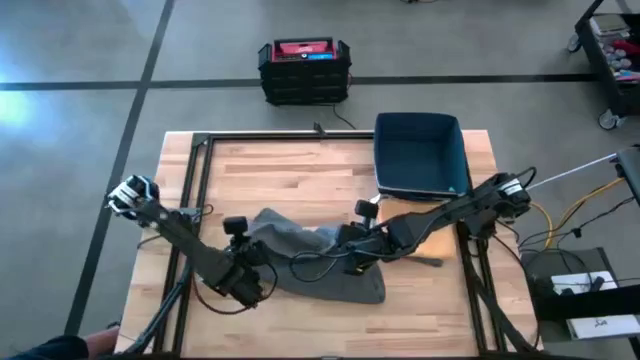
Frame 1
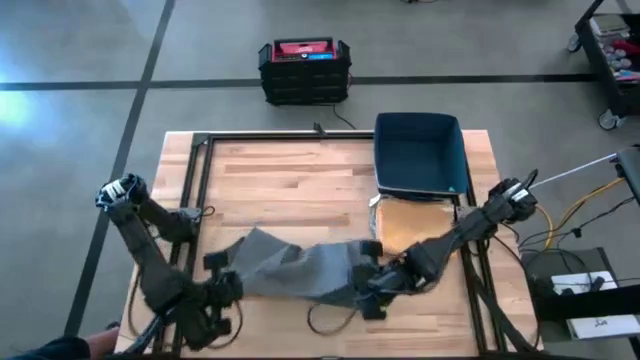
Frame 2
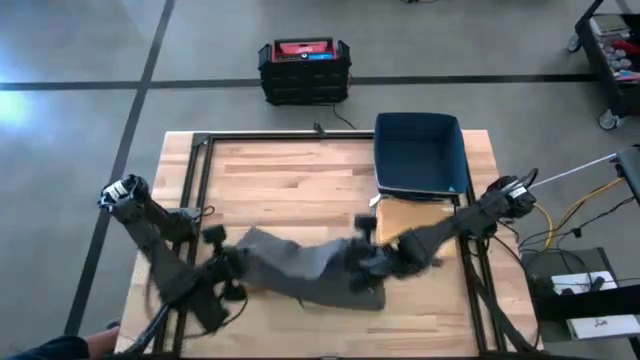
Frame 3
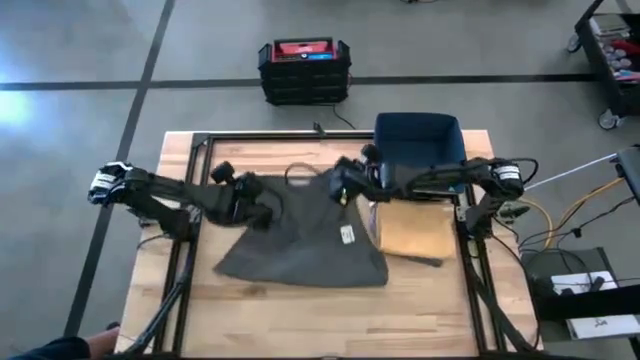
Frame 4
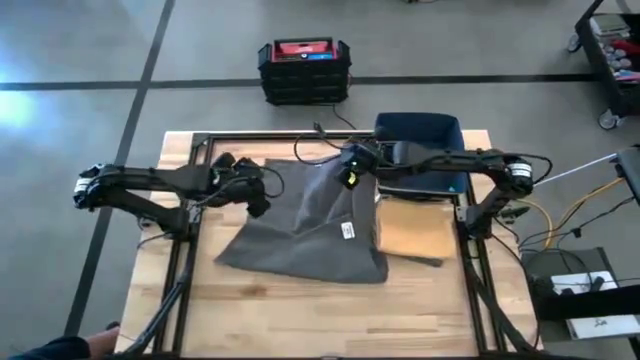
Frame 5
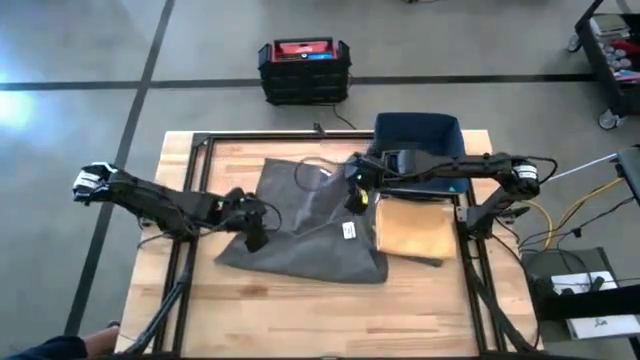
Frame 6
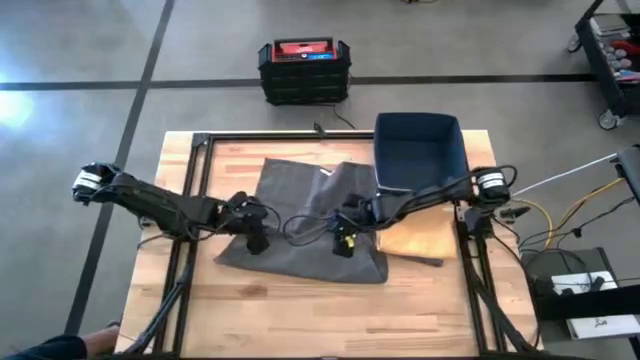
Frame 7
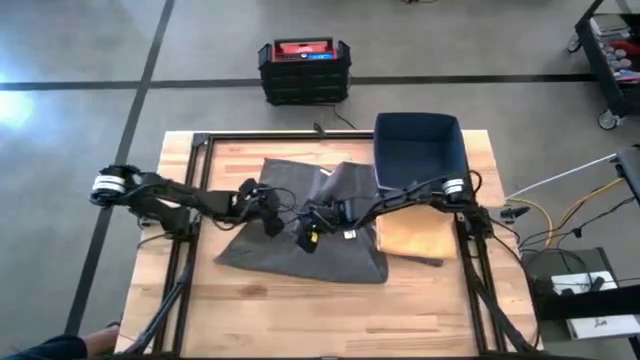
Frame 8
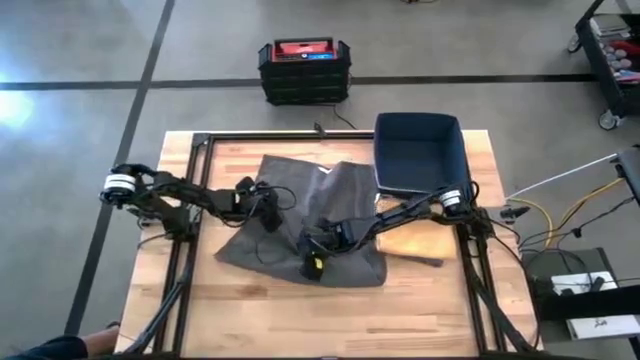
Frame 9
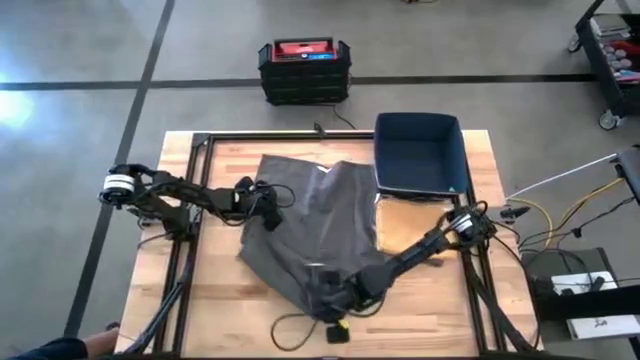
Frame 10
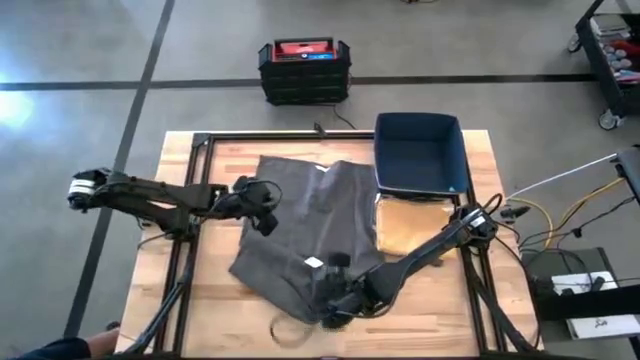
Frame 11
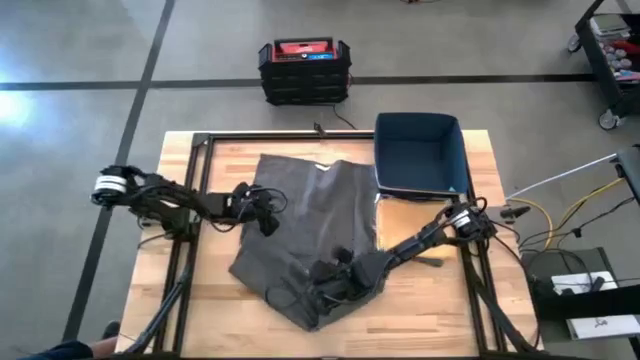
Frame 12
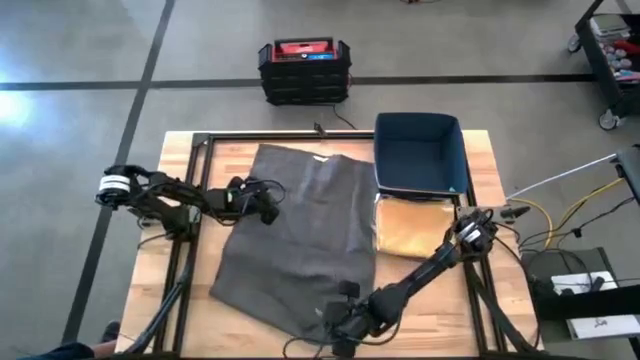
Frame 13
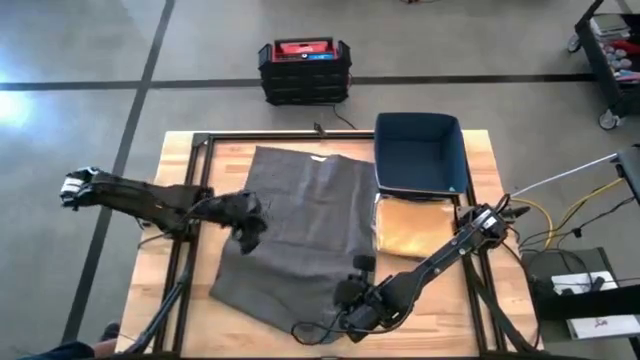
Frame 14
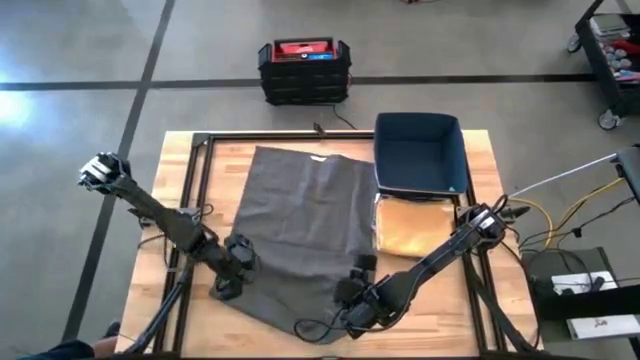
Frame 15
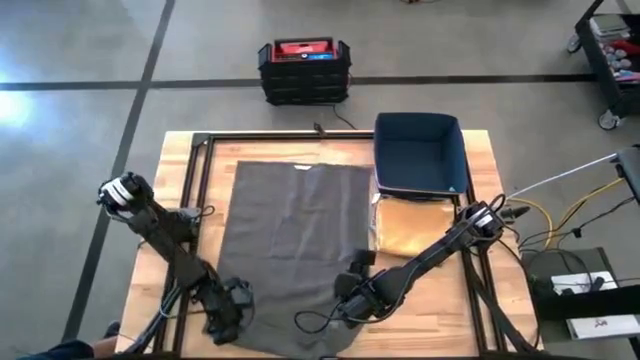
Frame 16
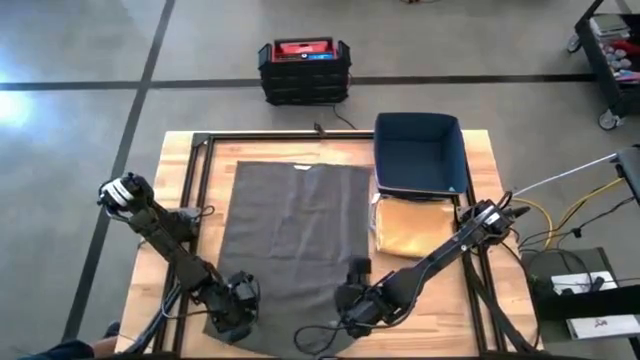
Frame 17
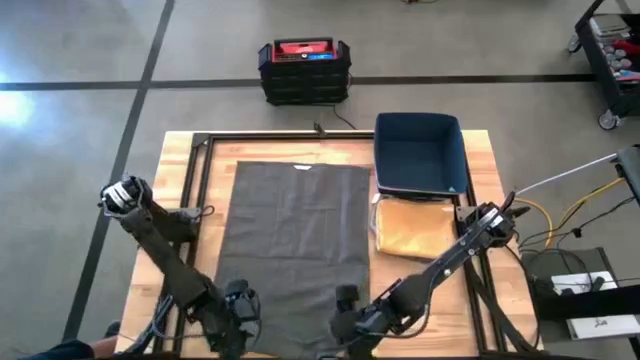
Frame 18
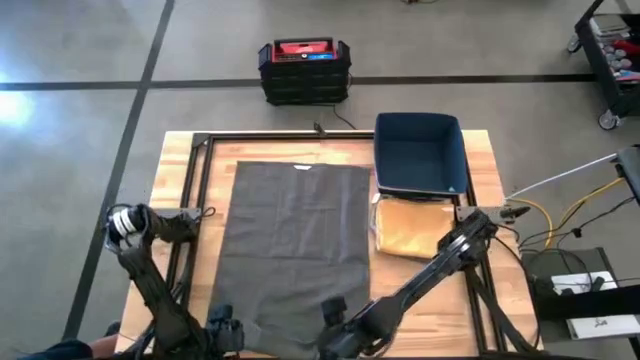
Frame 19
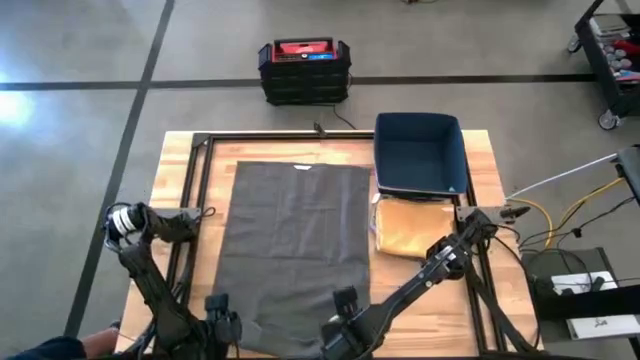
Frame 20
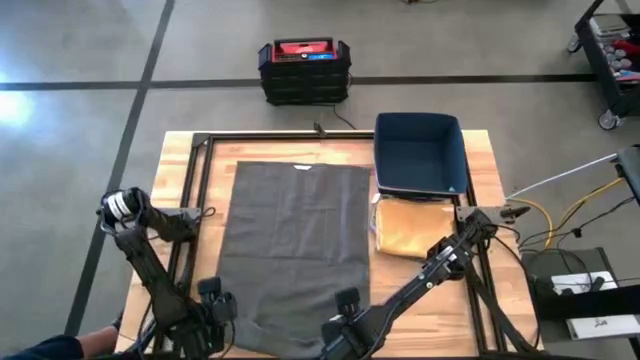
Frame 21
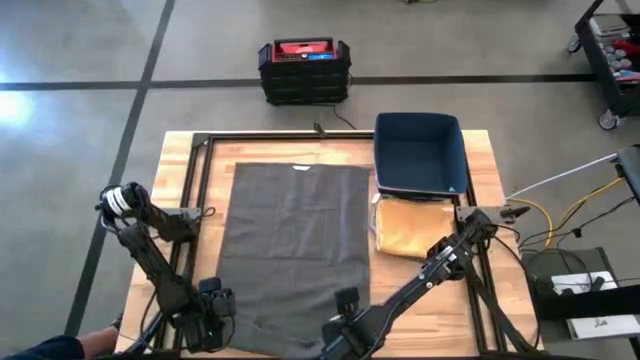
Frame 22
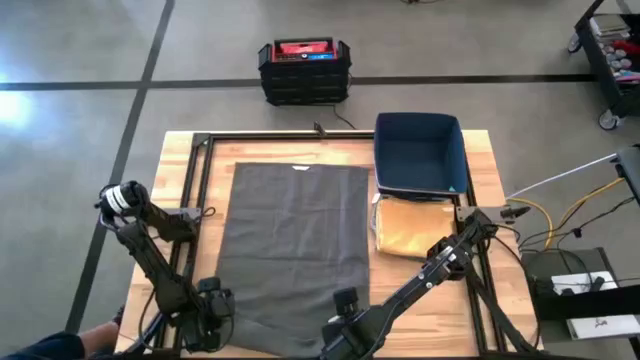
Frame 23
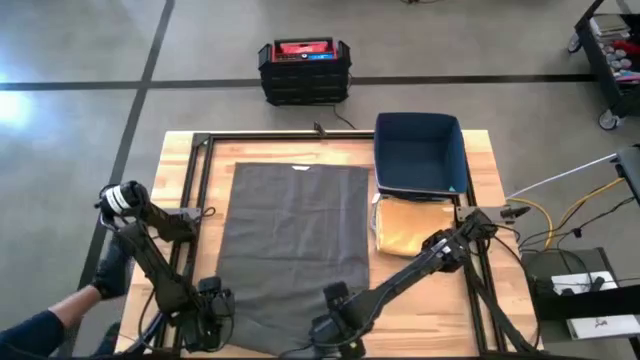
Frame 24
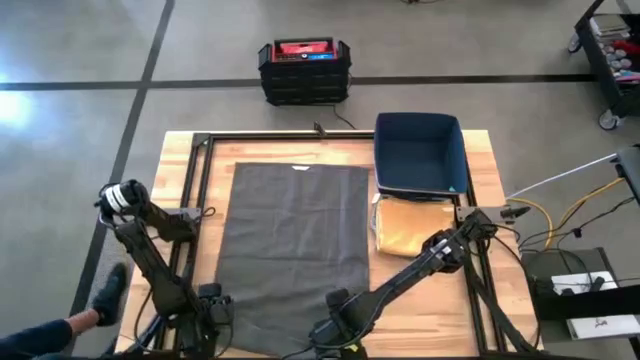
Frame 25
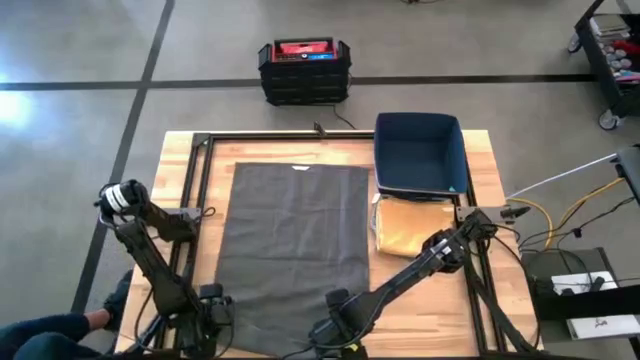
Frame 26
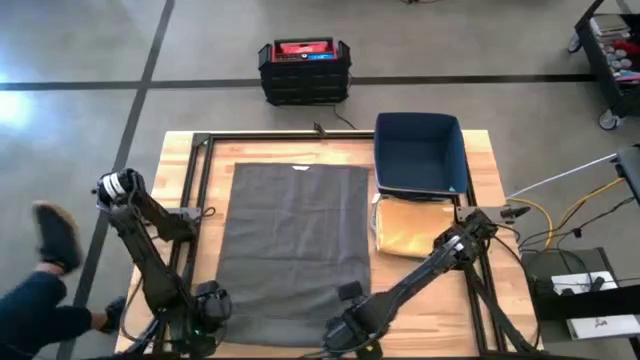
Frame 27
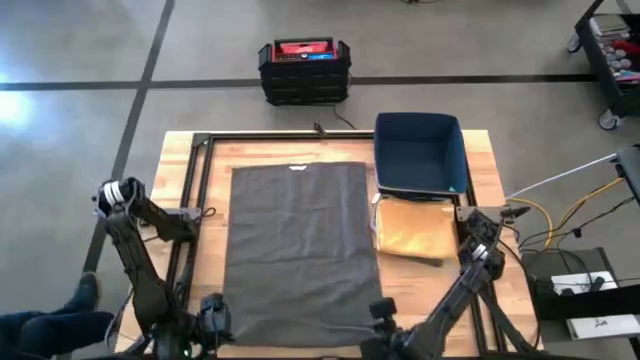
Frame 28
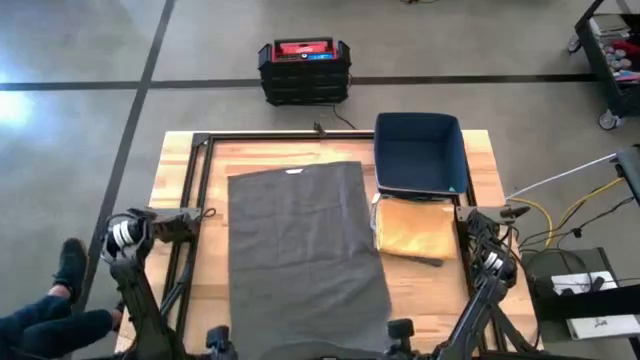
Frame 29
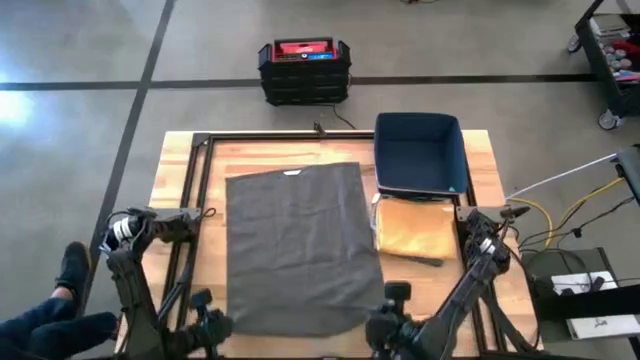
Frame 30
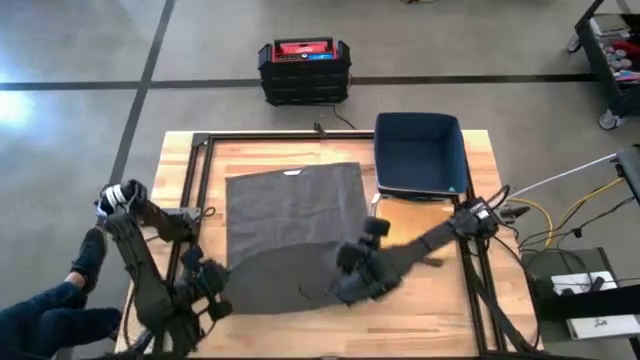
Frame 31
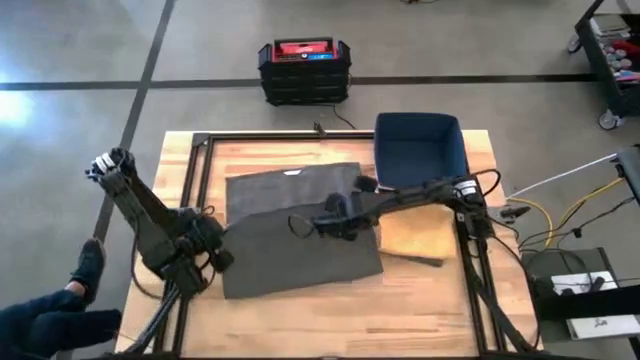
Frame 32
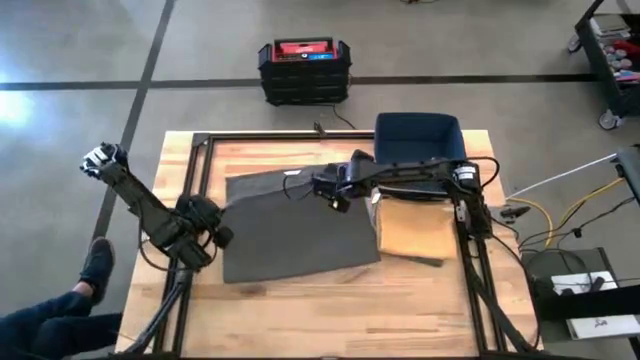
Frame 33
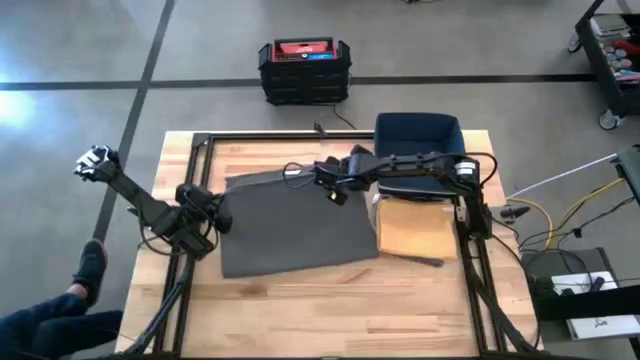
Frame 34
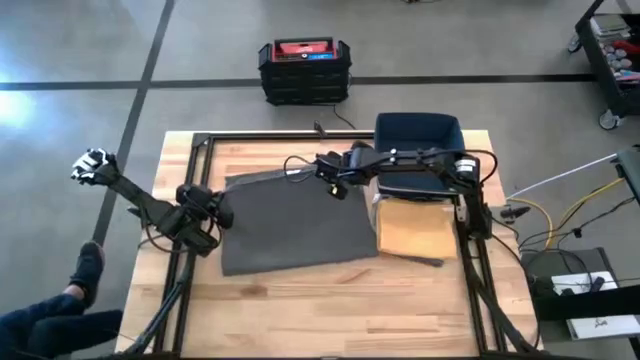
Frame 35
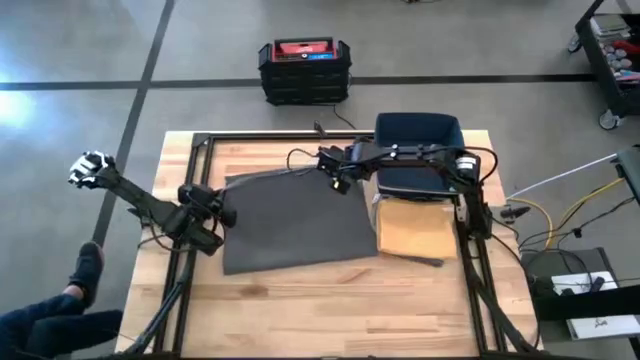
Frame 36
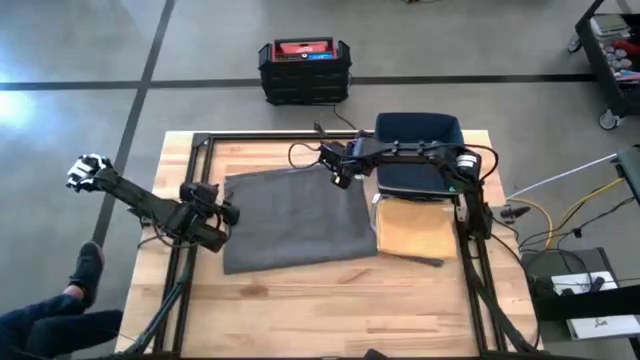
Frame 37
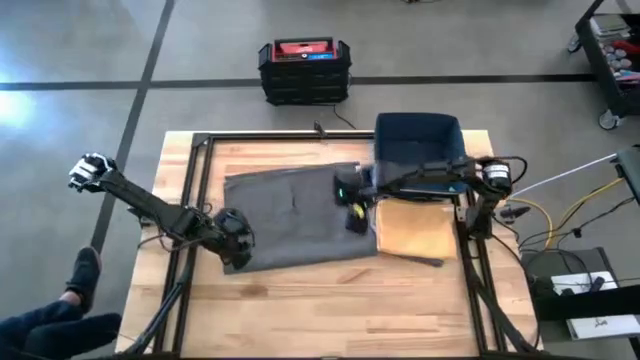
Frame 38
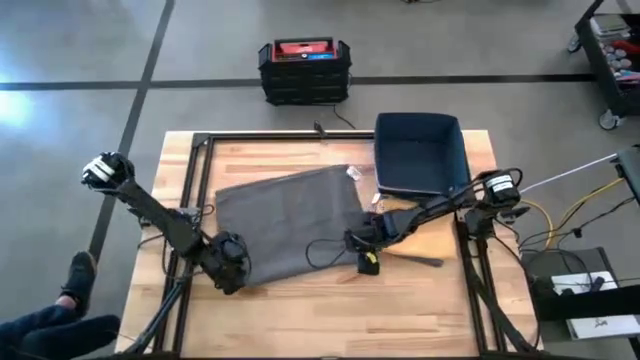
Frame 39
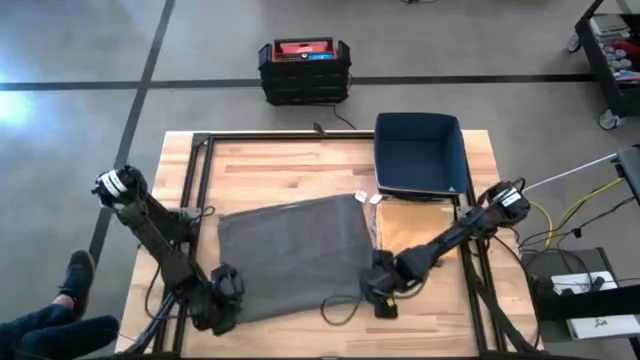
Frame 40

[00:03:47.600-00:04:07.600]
Task: Fold towel
Fold the gray kitchen towel

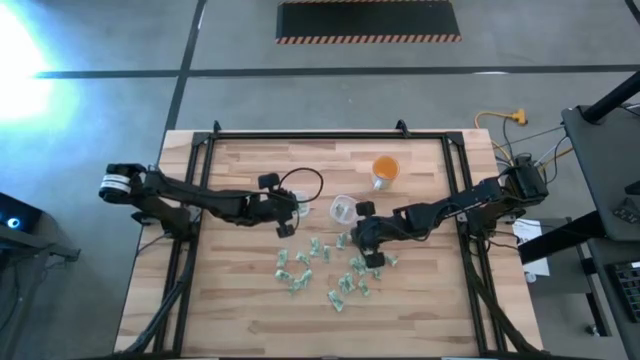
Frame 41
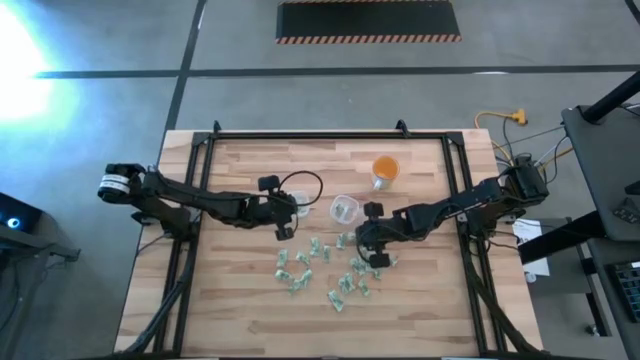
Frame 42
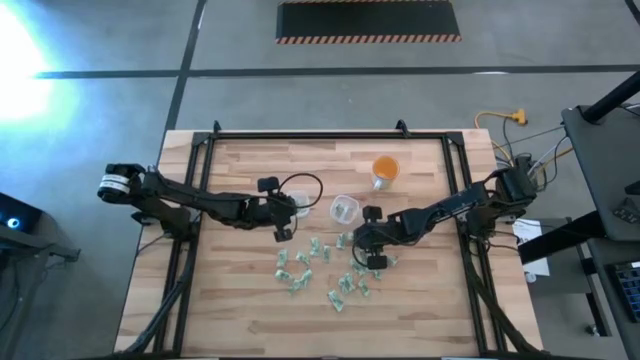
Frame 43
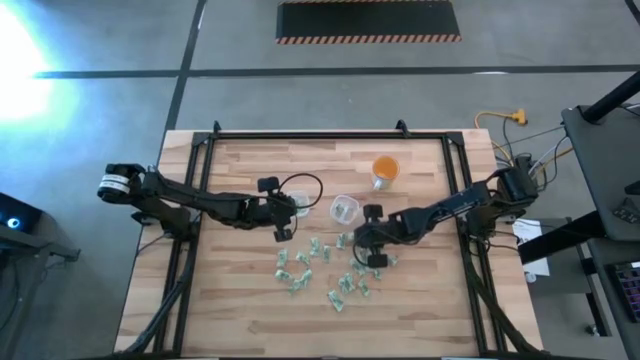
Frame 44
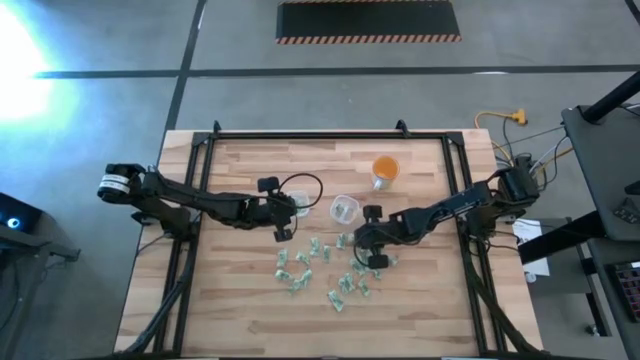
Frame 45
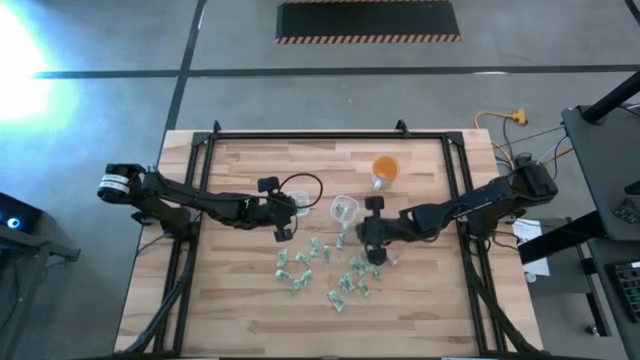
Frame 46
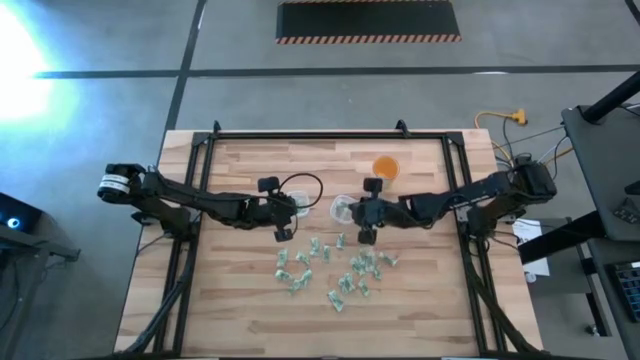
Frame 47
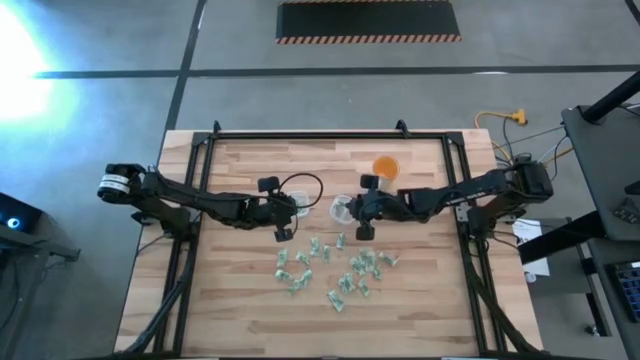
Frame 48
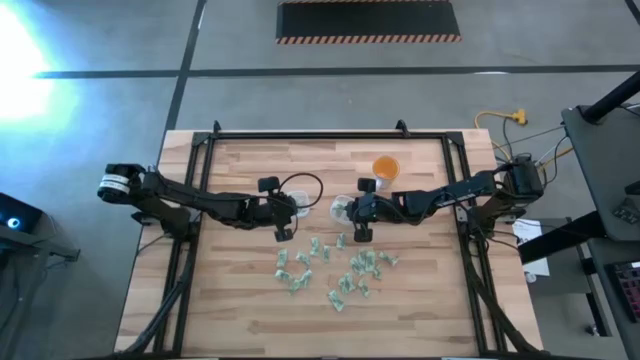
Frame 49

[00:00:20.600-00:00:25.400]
Task: Pick and place items into bin
Put the white stevia packet into the right transparent bin
